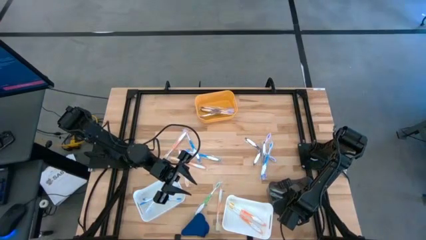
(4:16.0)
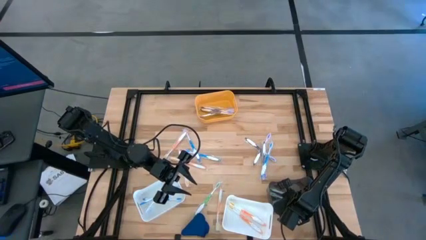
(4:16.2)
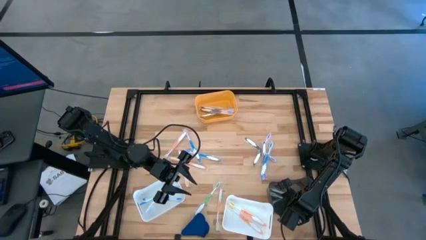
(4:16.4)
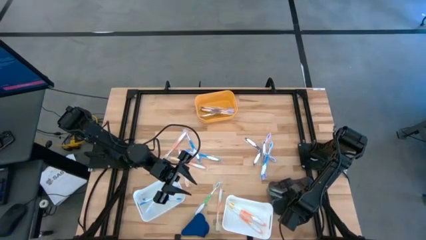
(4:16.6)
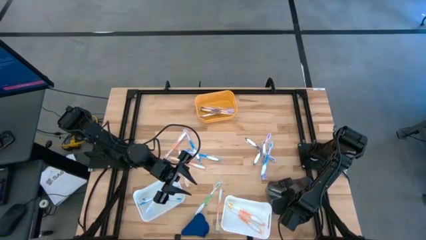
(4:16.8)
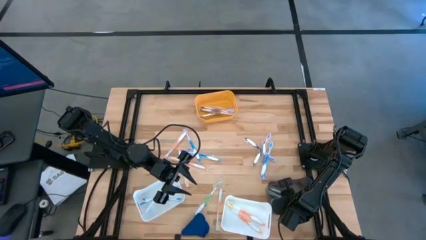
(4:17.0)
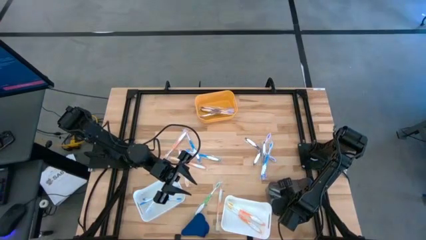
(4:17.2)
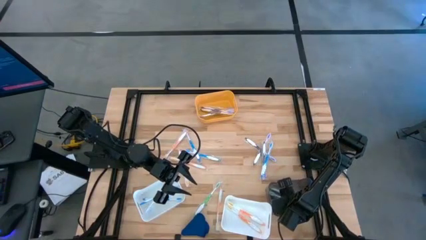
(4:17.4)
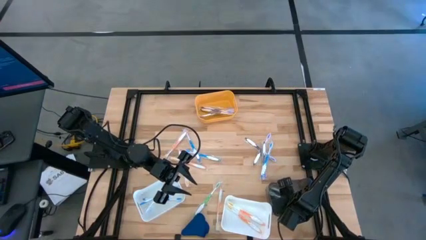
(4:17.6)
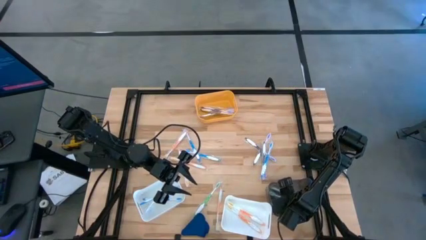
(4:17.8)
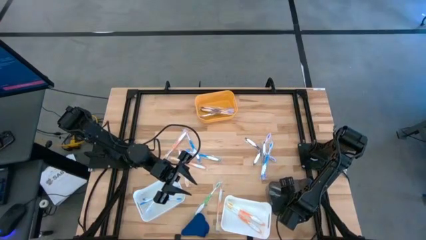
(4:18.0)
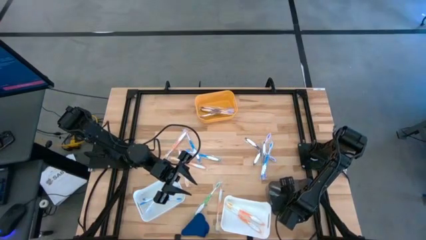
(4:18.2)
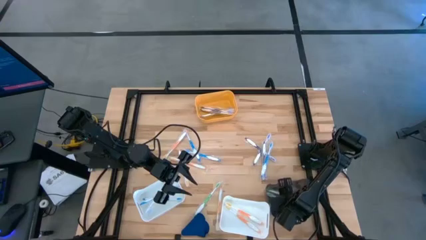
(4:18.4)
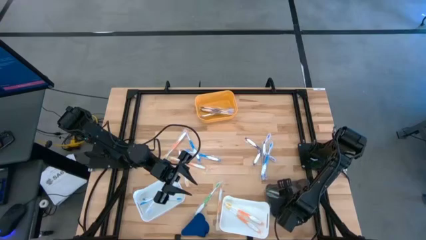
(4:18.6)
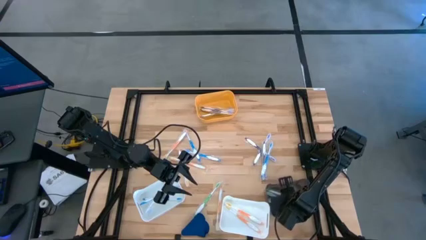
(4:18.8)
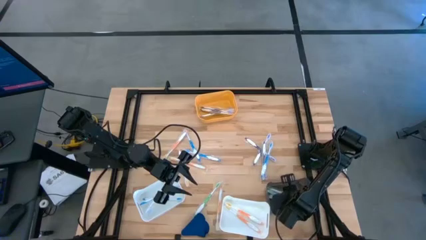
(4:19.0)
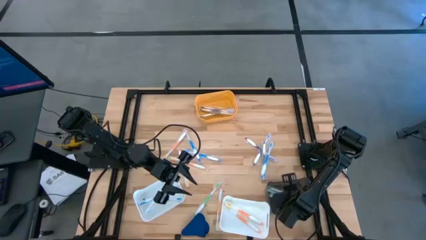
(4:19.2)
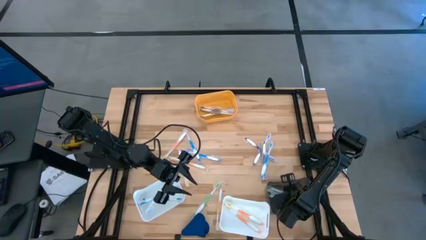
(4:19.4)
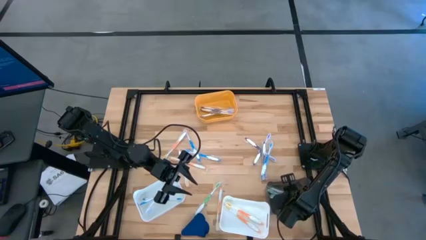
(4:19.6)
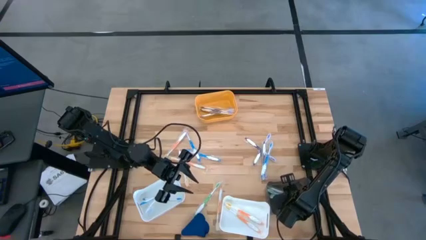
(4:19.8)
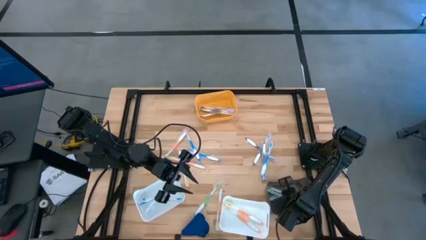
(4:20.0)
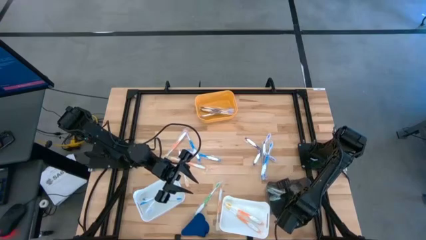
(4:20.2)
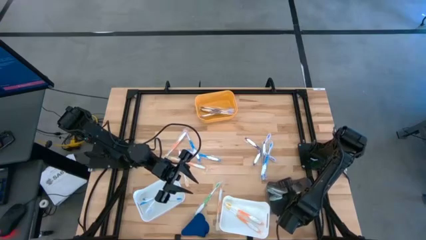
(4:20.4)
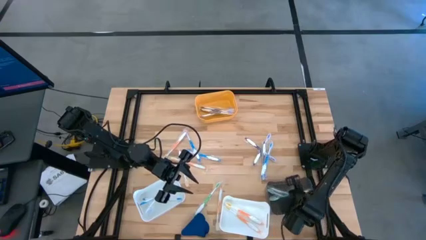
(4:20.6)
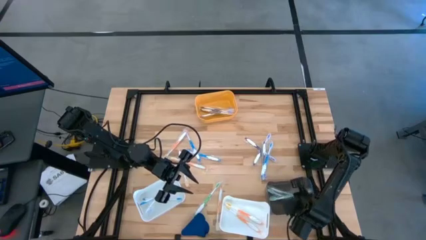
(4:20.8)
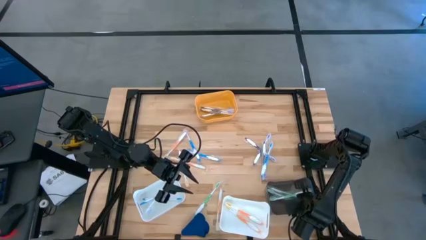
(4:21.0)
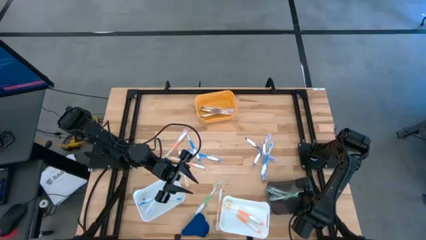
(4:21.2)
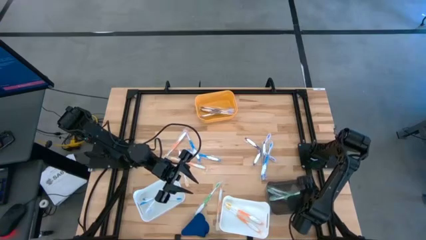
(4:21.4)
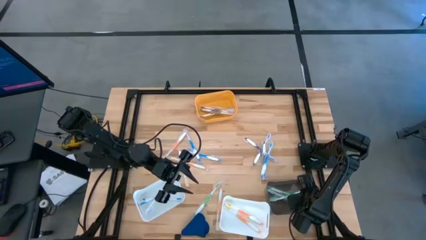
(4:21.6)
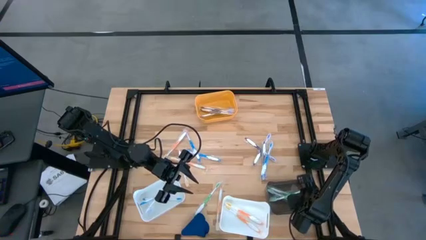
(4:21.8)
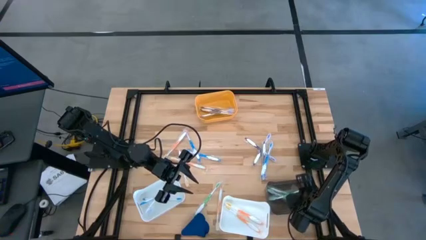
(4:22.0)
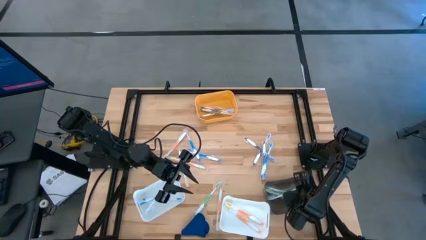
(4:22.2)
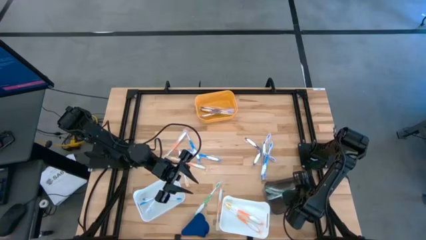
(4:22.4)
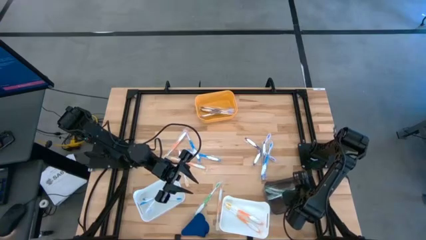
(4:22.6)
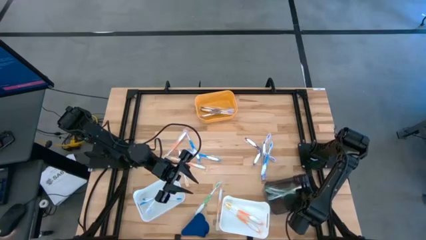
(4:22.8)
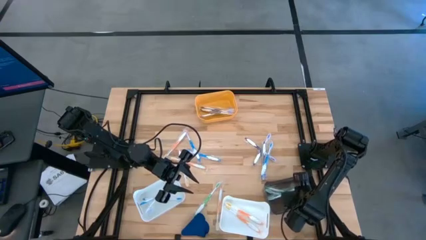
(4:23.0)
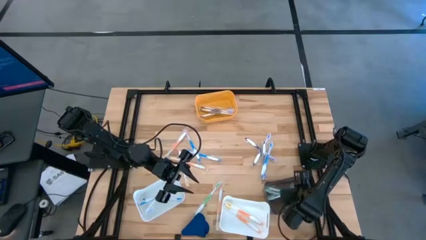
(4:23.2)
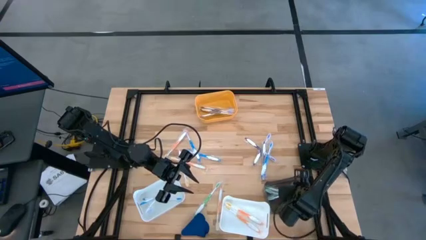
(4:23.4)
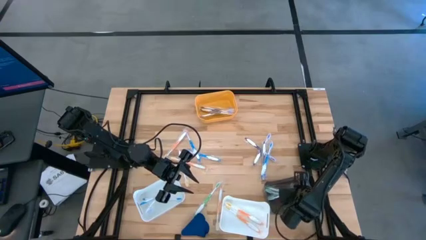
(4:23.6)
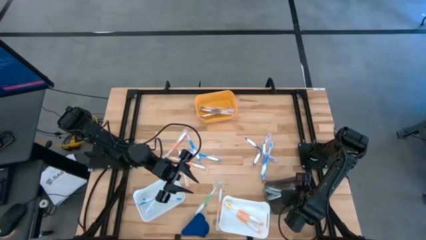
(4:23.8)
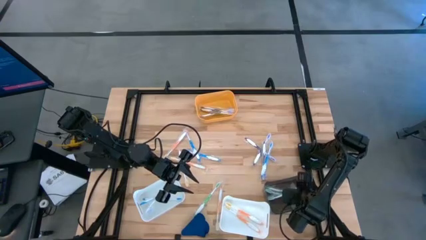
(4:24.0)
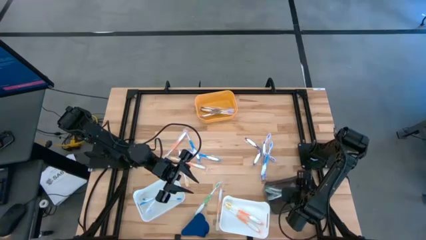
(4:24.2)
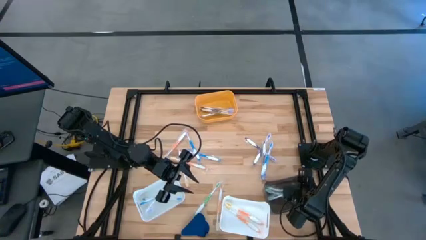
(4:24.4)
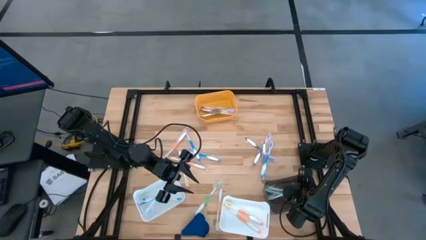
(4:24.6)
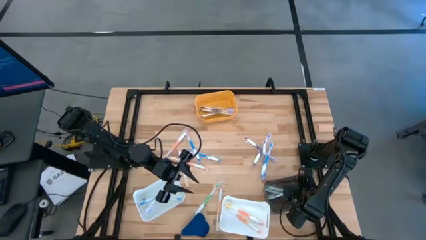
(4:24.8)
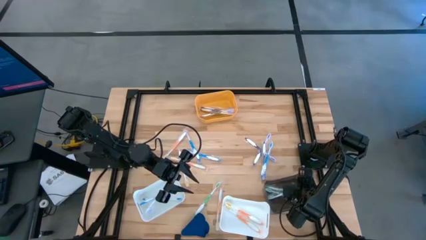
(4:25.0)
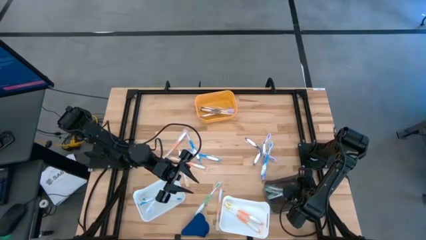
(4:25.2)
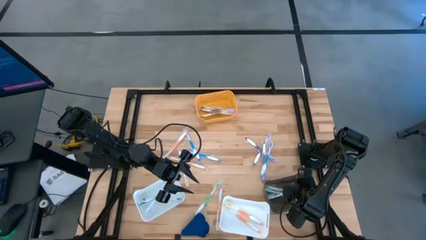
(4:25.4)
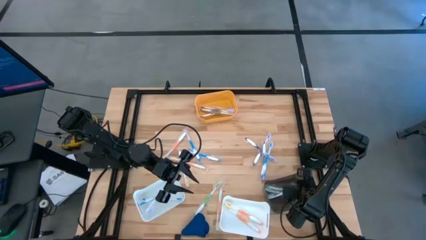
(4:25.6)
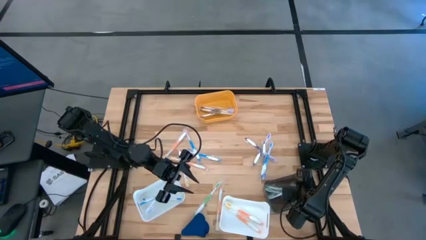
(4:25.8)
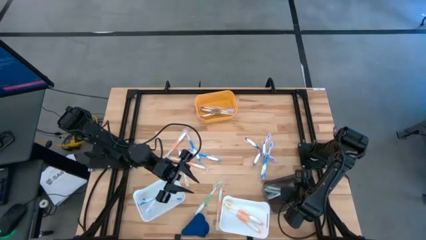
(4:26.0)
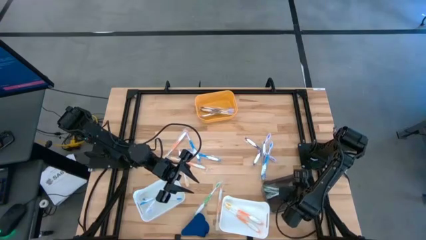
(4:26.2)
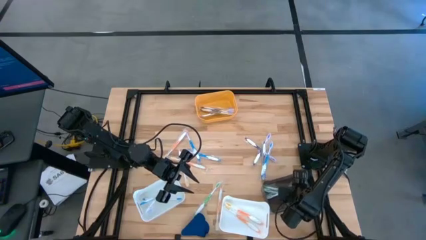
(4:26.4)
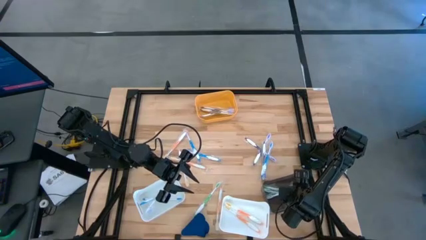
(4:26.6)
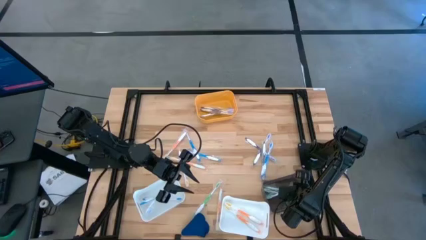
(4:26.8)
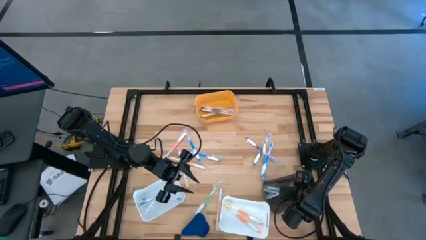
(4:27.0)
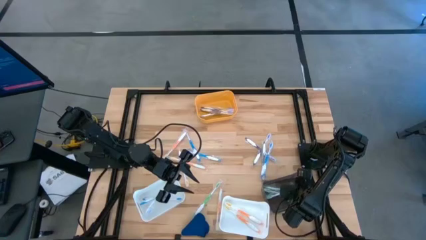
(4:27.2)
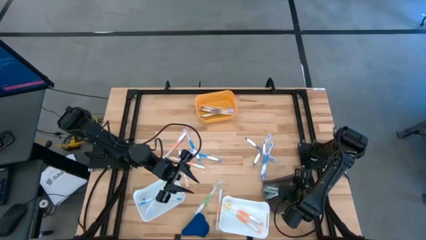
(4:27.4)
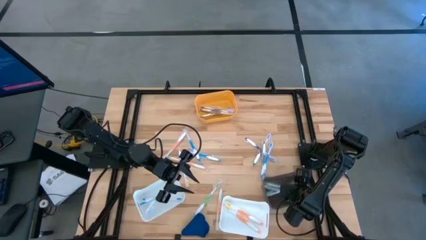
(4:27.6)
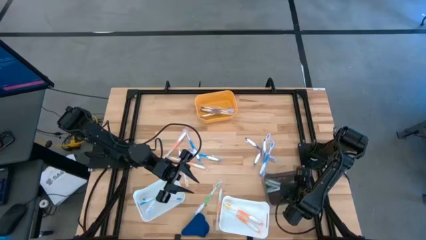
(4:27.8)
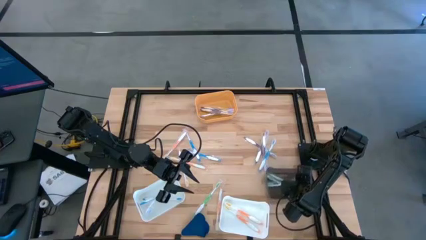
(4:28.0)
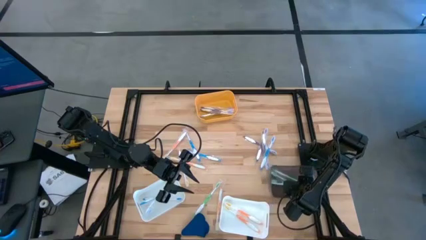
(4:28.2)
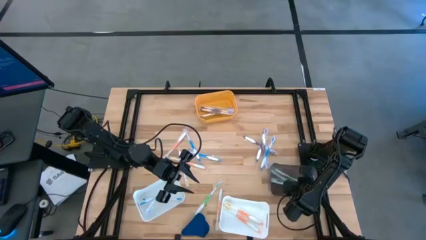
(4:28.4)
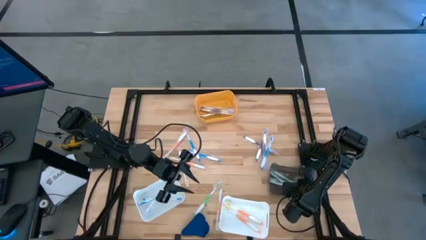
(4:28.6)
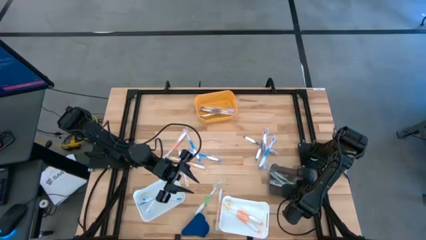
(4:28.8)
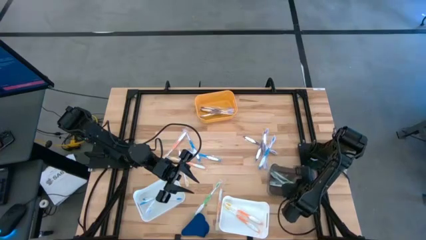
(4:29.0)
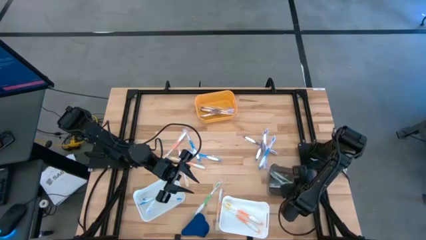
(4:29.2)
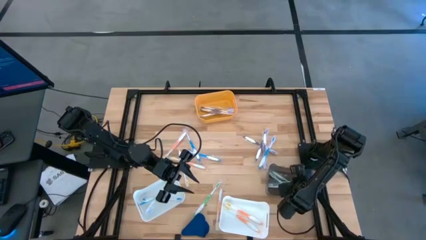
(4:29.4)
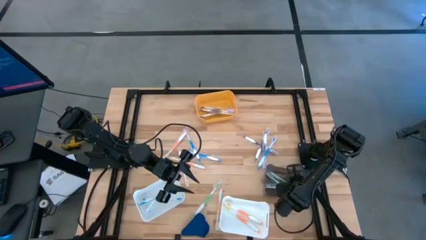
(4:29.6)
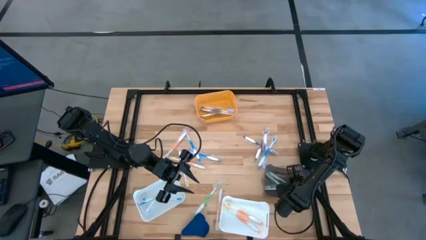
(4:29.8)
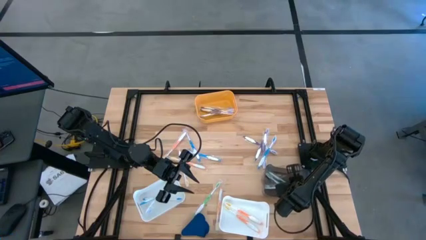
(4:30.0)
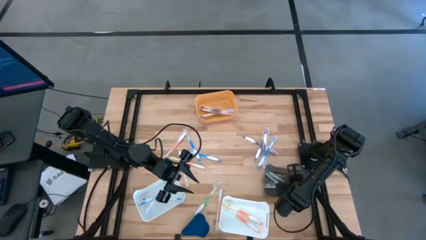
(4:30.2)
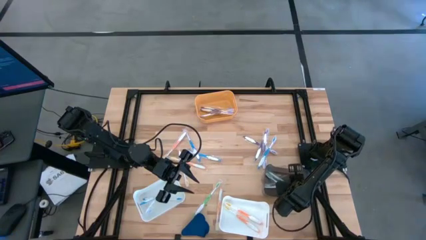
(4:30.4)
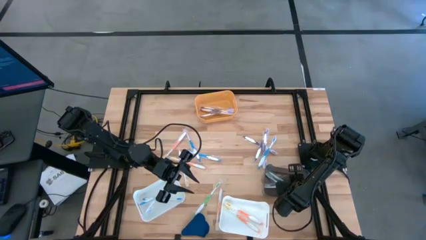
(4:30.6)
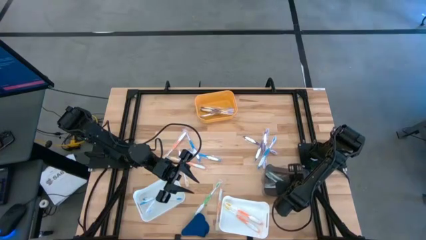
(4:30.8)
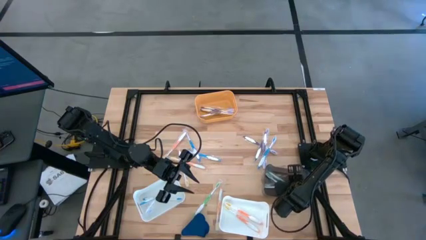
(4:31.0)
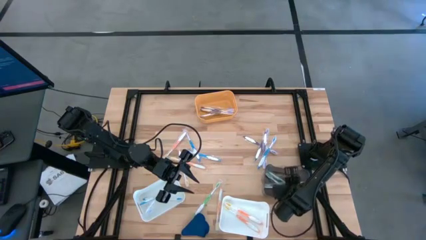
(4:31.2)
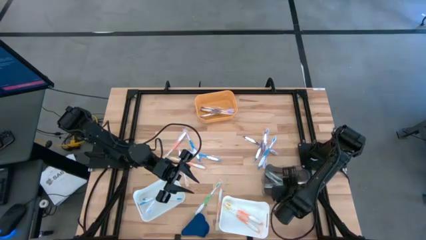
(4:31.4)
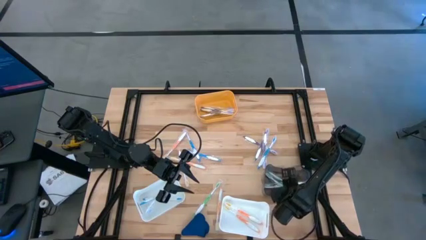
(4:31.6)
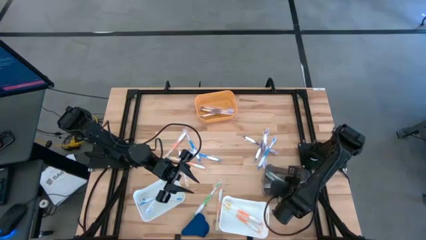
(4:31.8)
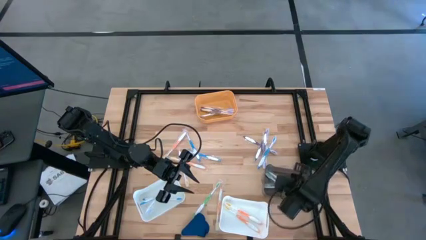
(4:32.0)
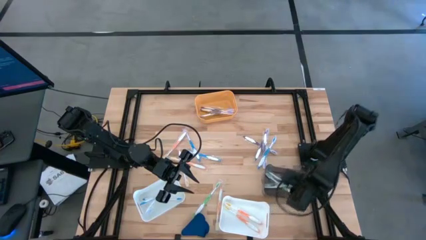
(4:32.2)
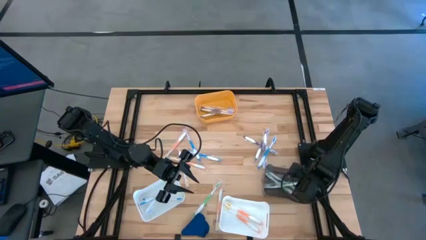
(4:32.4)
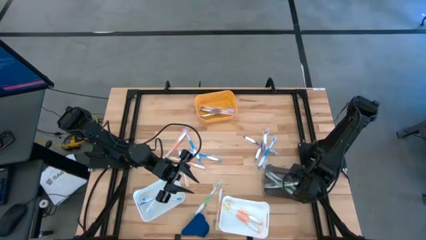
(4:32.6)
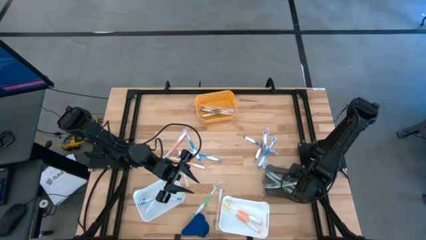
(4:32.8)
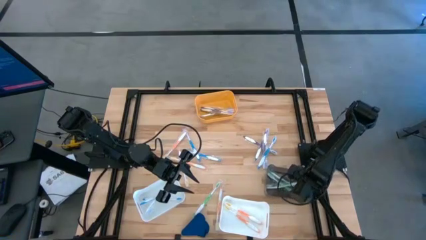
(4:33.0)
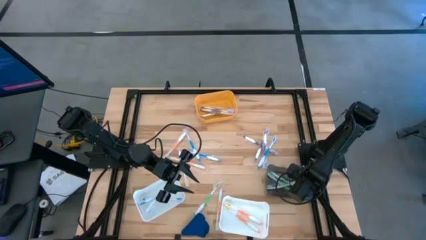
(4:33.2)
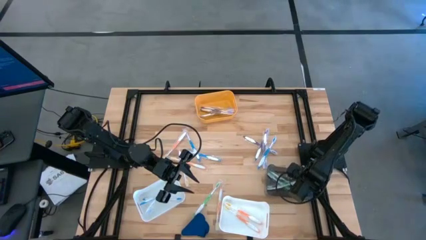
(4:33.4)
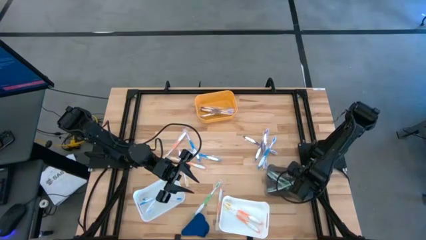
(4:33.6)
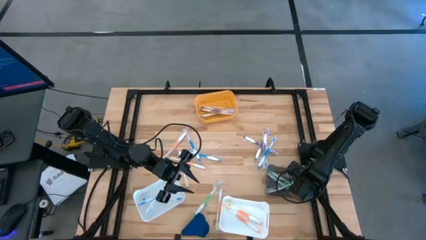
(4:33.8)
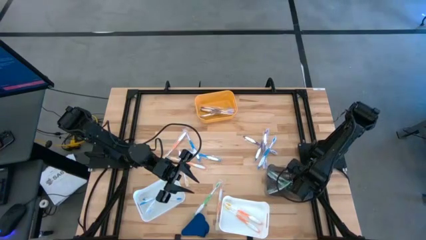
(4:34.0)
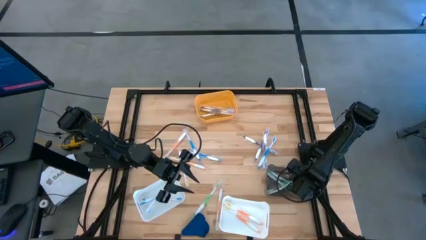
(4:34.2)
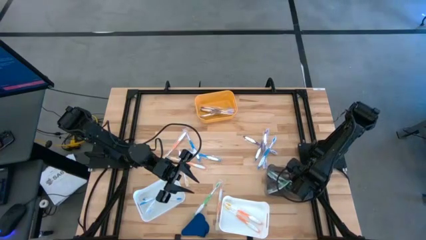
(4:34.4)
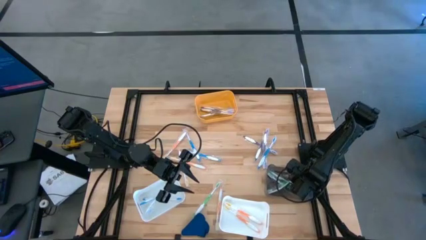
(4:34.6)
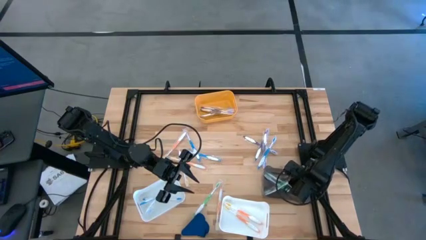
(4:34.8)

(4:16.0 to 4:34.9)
Task: Pick & Place Toothbrushes
Put the green toothbrush into the black bin
